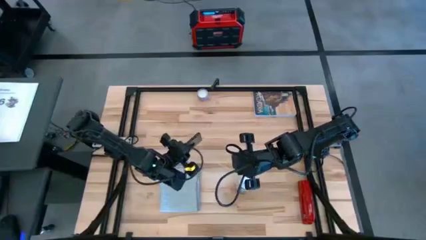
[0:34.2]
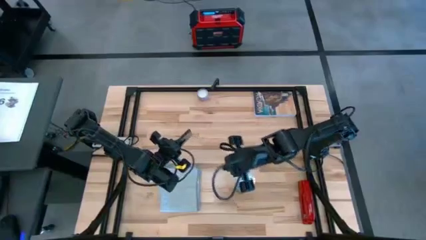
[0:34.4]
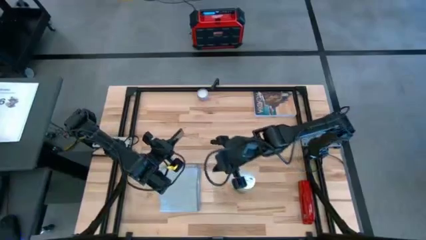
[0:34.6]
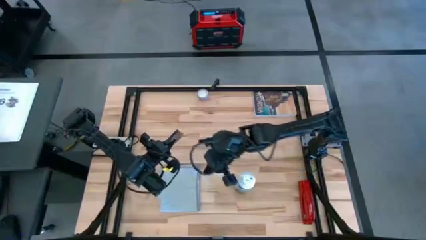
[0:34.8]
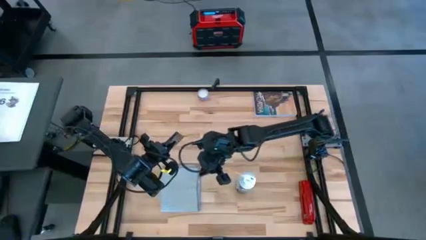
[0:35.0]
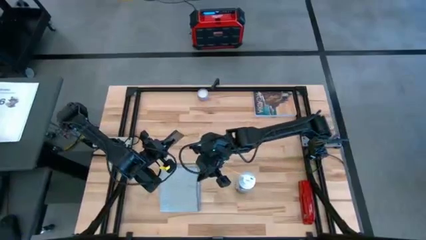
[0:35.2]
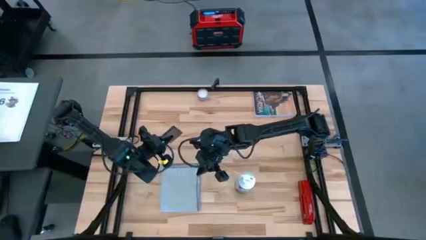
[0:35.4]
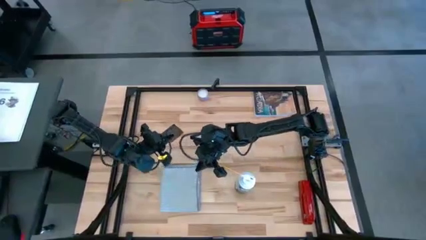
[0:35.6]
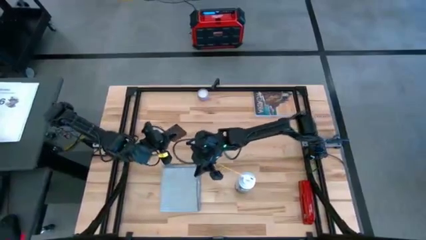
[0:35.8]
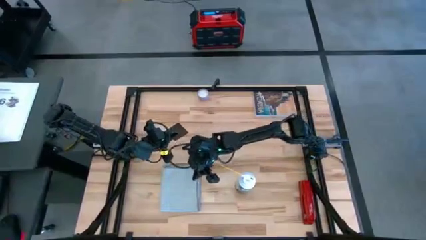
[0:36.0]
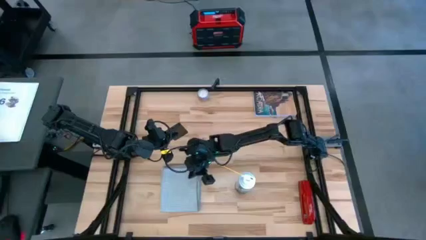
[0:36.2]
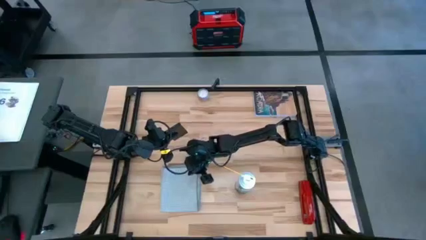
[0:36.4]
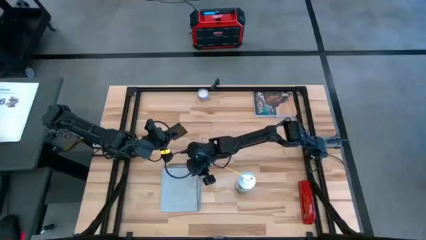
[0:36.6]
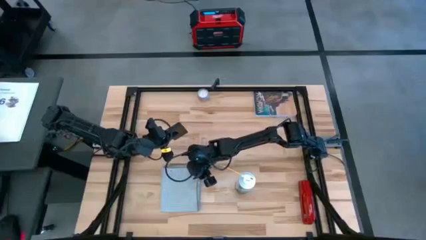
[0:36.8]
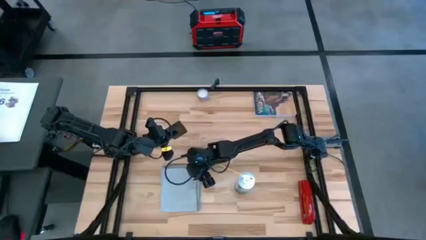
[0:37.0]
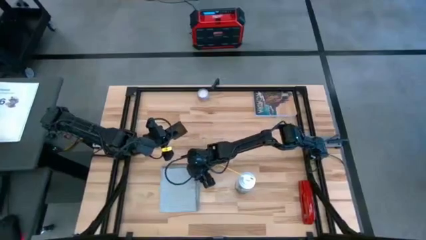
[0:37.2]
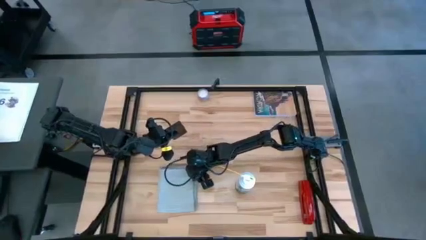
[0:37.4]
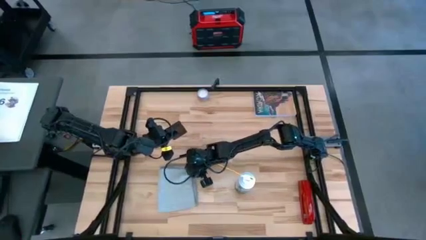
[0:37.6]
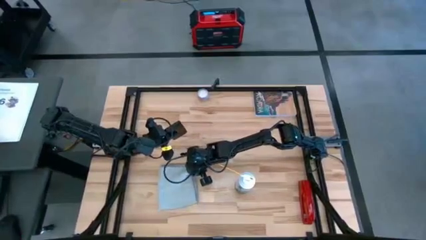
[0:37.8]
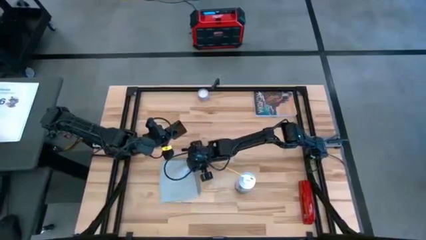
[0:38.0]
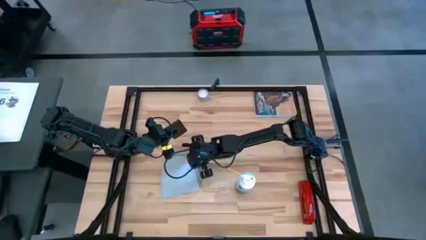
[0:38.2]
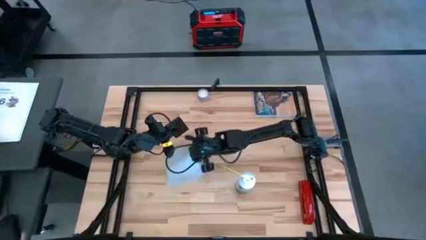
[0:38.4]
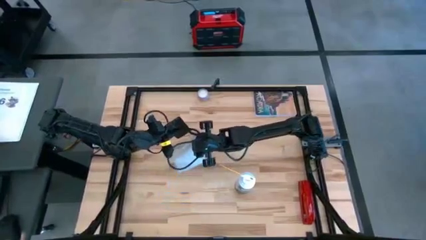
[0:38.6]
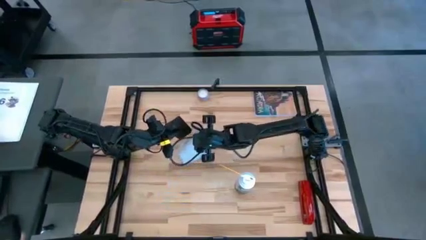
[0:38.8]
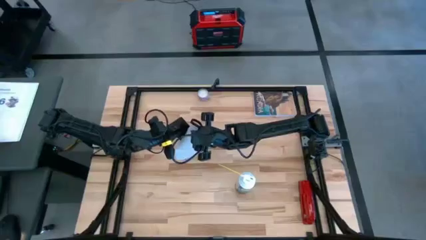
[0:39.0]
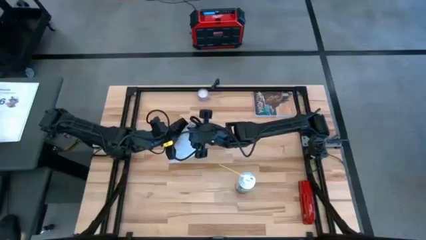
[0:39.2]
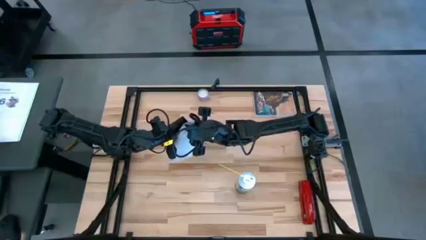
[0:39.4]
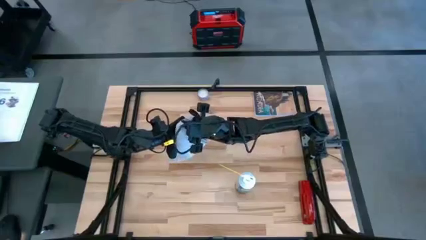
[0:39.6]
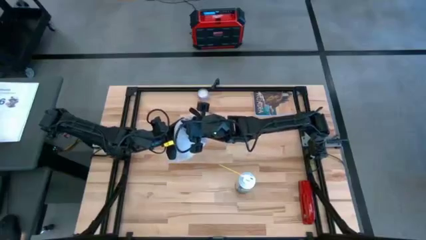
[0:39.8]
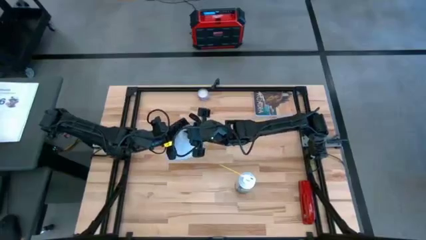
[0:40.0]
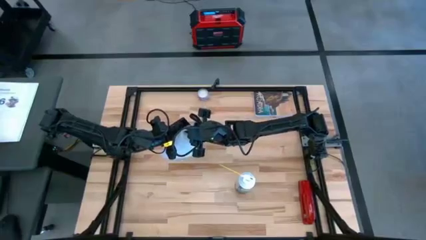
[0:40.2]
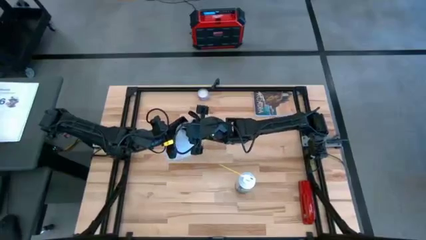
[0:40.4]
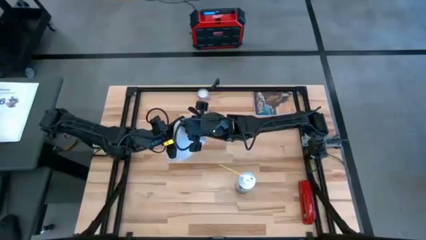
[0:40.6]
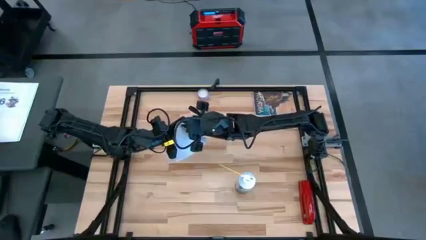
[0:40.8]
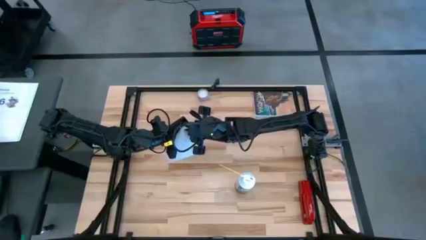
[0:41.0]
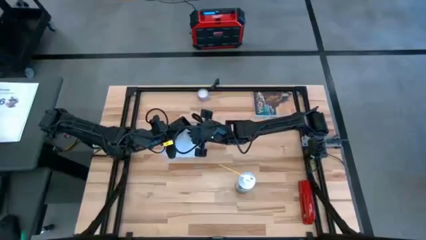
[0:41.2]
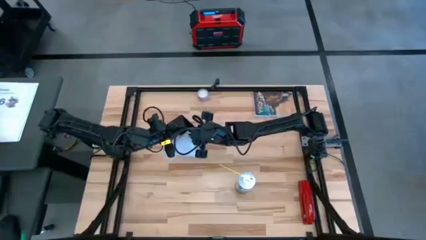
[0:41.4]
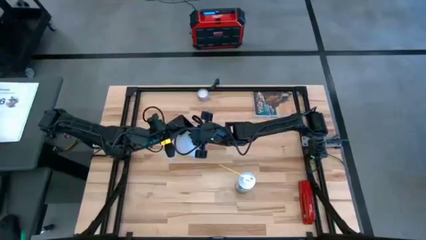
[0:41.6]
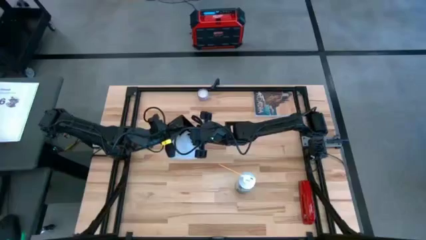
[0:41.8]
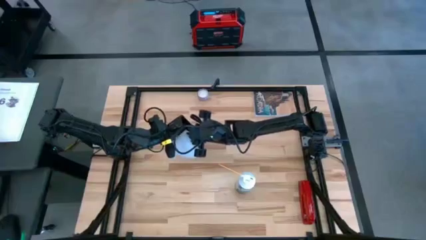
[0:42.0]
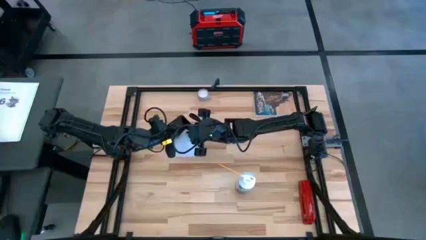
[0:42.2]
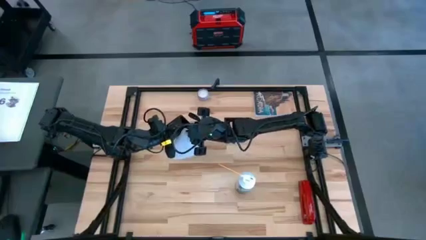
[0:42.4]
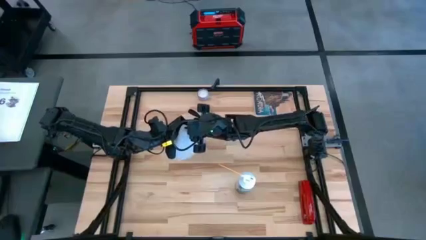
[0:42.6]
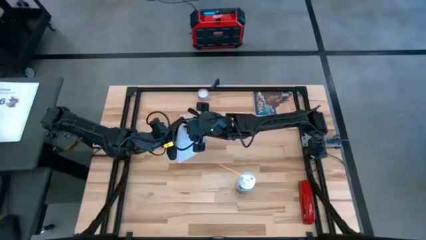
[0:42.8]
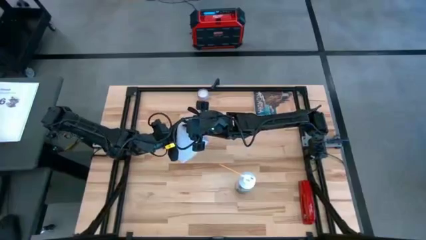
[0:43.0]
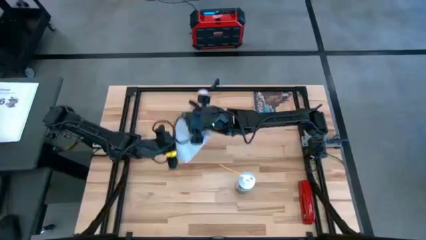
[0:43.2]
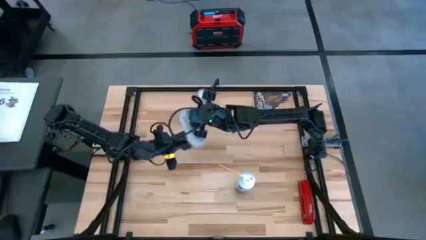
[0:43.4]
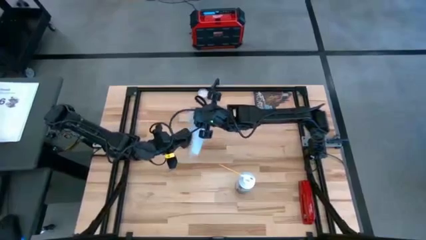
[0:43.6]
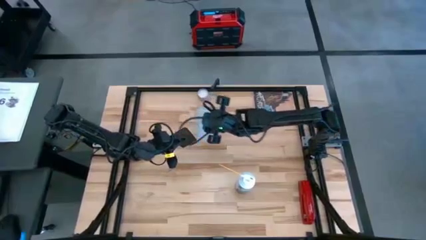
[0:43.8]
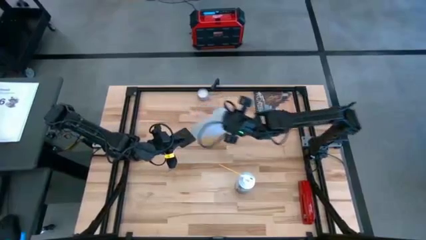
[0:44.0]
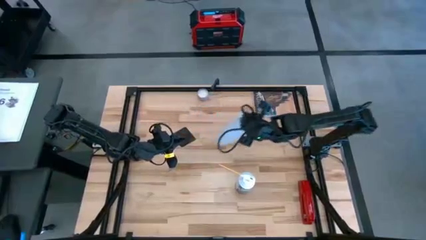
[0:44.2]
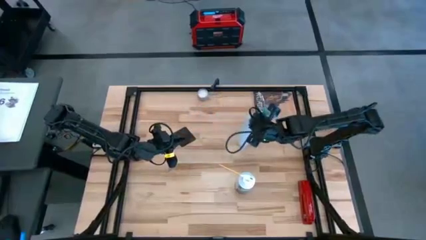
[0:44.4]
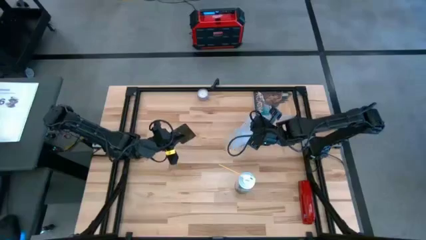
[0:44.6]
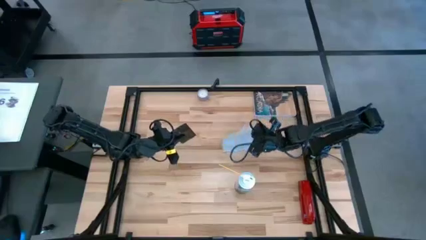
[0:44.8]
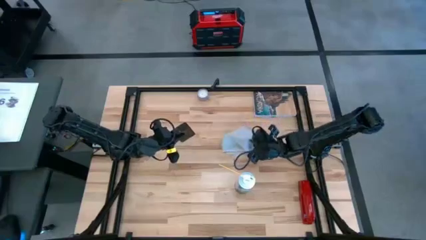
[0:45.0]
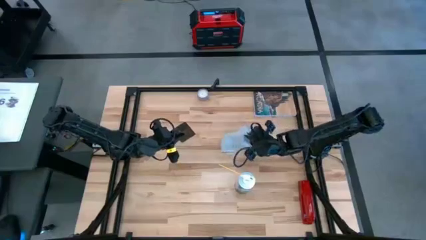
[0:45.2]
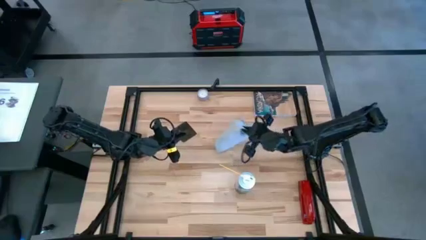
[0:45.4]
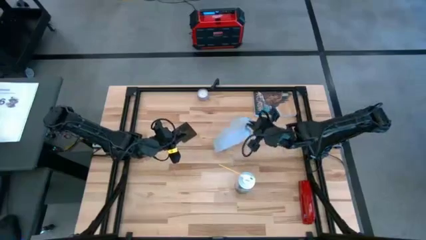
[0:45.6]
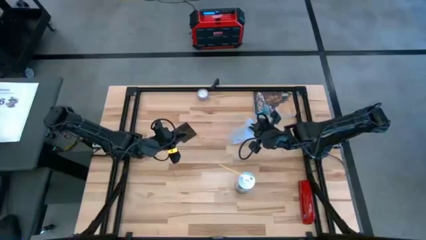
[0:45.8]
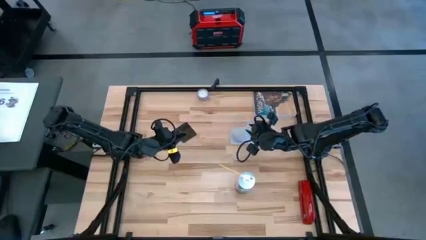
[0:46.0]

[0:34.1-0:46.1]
Task: Apply microfiber cloth
Wipe the back of the cellphone with a gray microfiber cloth

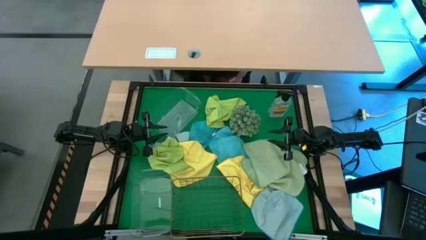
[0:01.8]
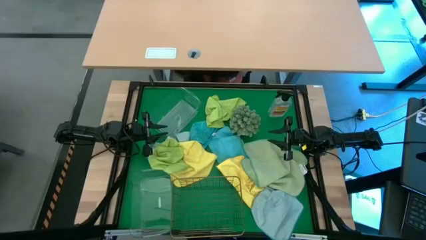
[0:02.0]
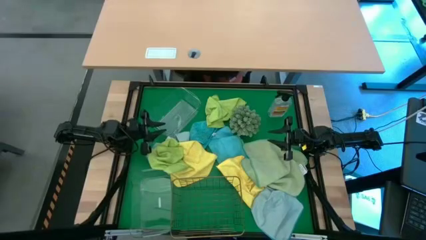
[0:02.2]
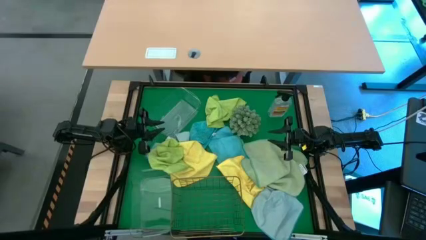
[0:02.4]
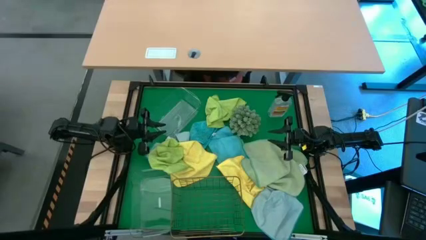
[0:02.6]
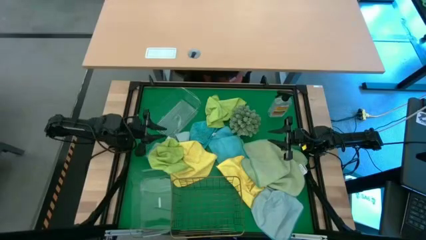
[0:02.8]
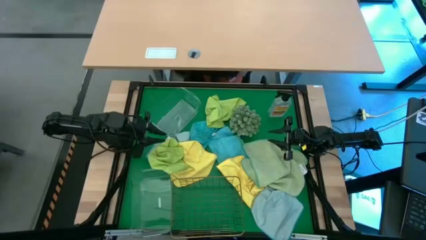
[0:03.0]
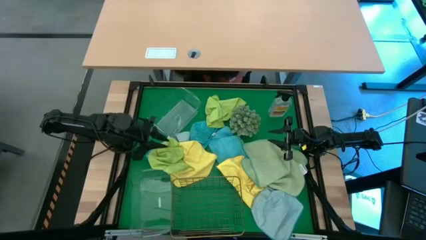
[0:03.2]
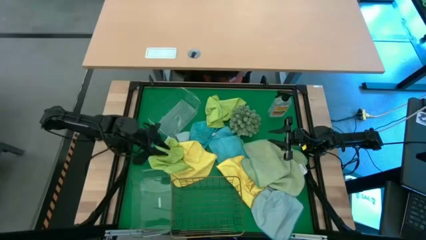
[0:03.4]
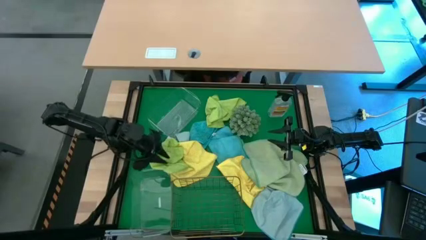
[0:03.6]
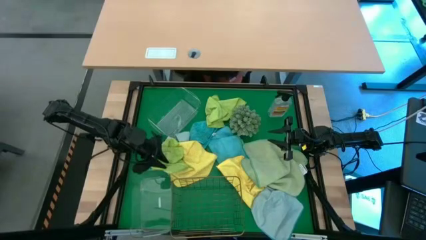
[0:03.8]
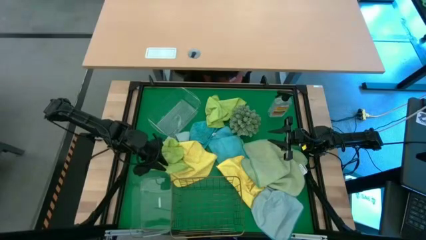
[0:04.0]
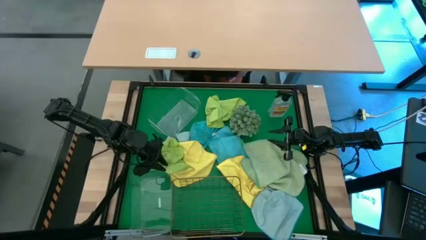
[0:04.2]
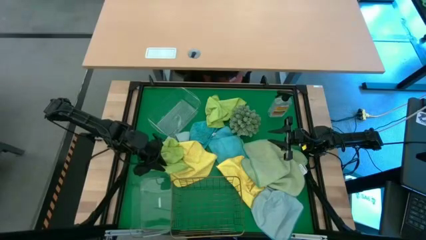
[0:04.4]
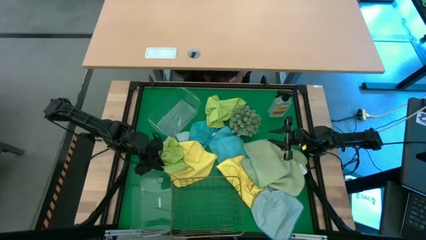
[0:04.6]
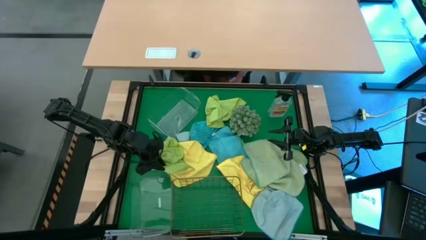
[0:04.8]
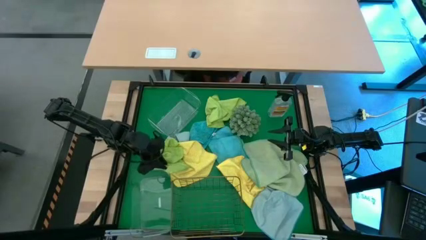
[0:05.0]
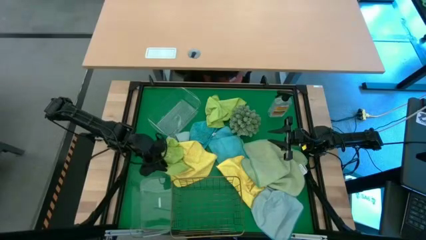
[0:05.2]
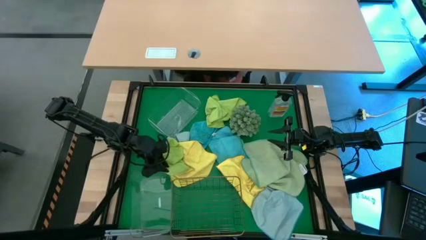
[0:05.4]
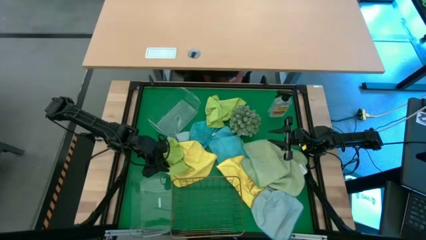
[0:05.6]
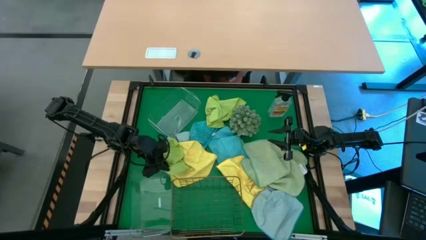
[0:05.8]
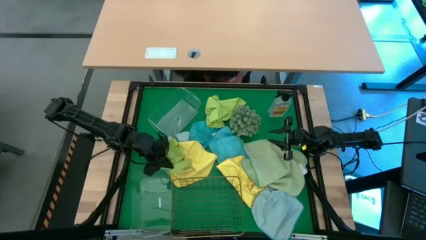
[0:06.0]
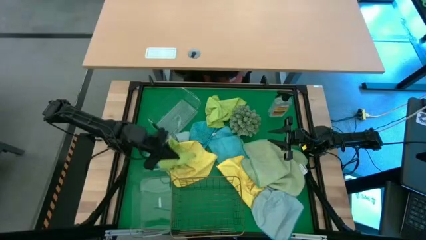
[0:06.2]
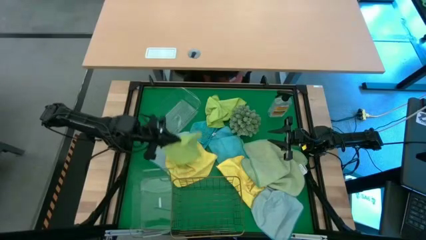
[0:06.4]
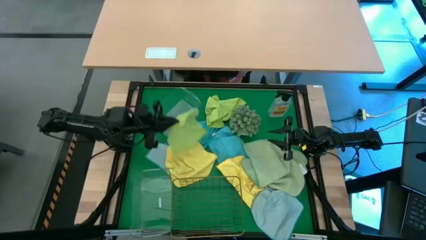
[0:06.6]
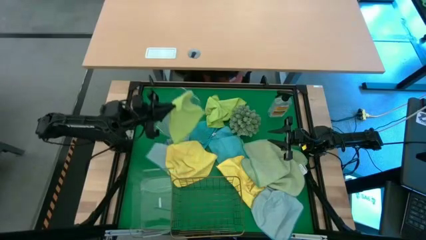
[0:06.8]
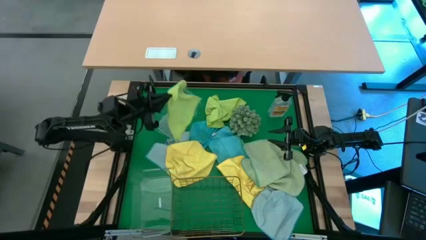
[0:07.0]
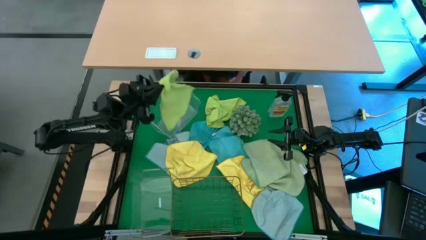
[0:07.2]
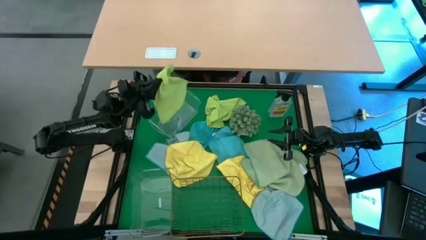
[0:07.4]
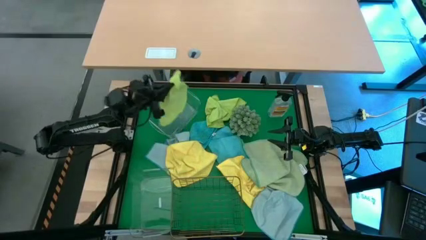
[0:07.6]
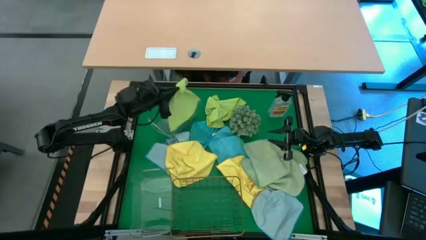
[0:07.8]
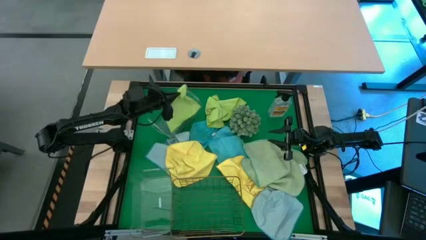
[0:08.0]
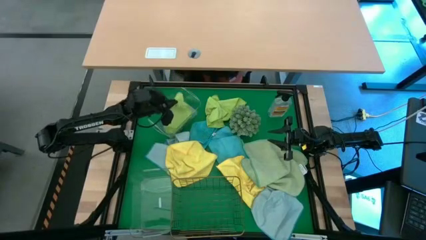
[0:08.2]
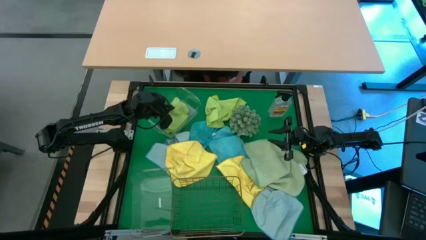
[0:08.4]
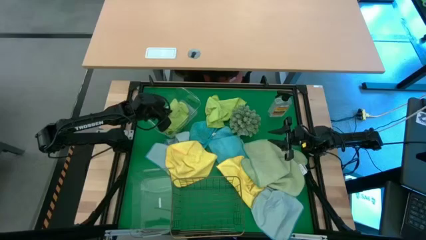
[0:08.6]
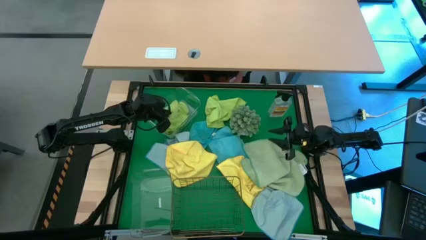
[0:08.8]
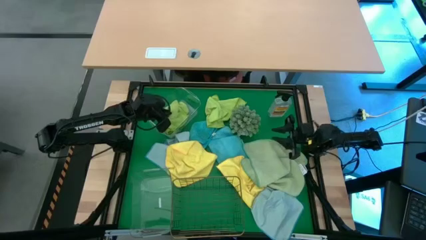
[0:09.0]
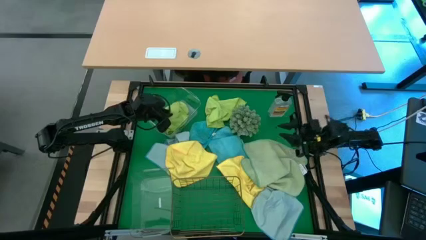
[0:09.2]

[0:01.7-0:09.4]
Task: Sort microfiber towel by color & place in baskets
Put the bottom yellow green microfiber towel into the top transparent bin
